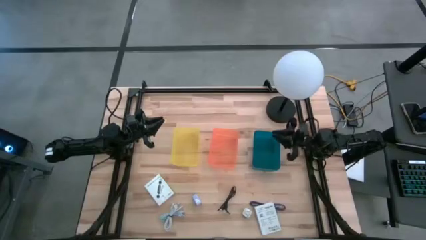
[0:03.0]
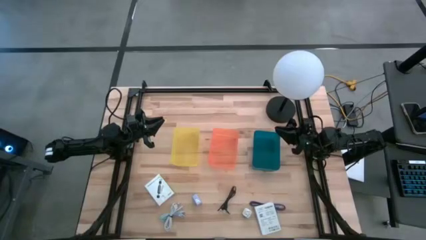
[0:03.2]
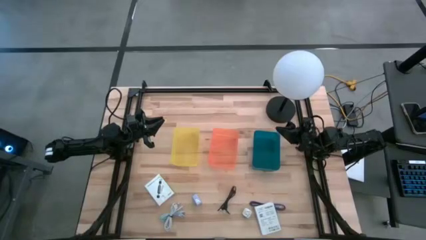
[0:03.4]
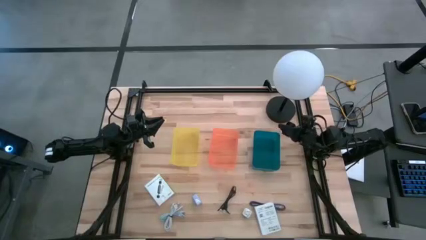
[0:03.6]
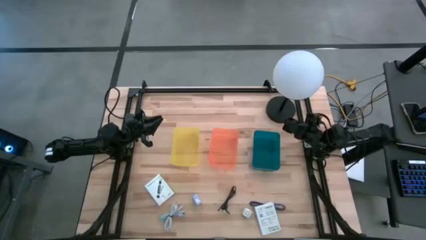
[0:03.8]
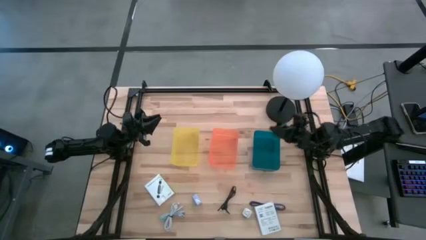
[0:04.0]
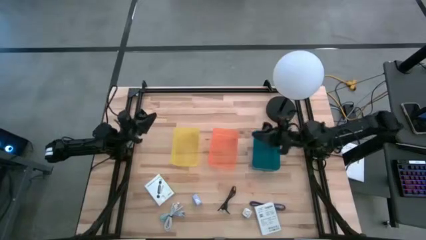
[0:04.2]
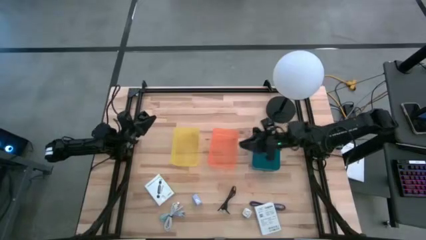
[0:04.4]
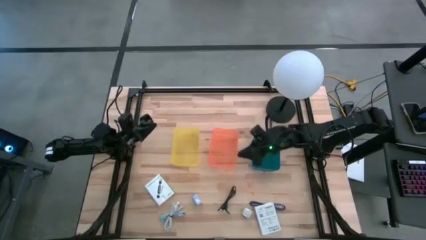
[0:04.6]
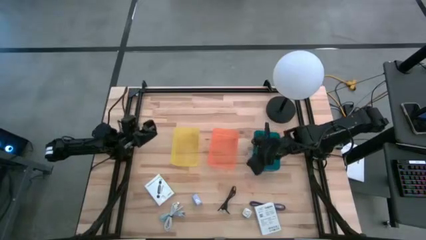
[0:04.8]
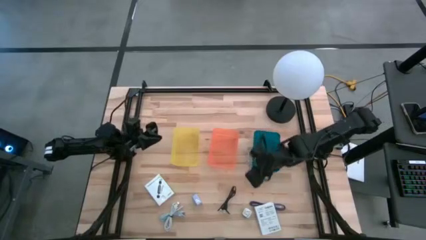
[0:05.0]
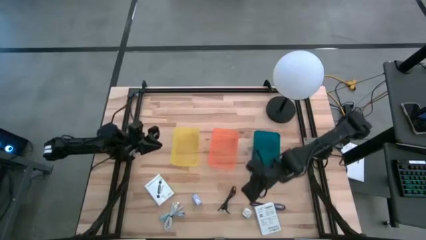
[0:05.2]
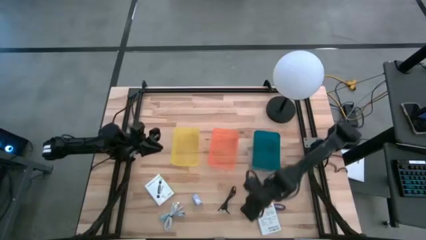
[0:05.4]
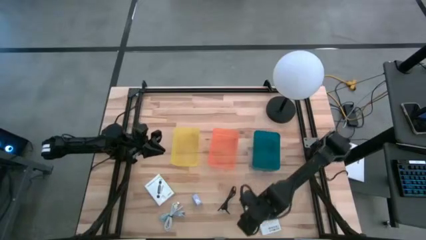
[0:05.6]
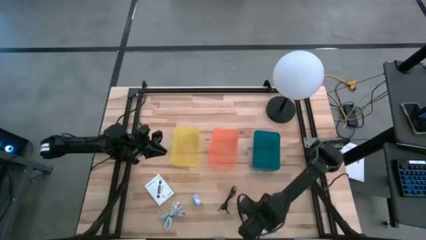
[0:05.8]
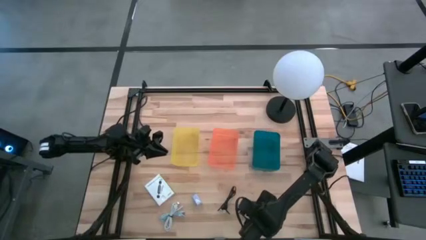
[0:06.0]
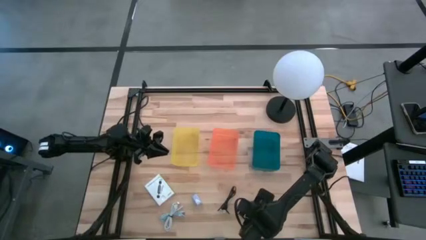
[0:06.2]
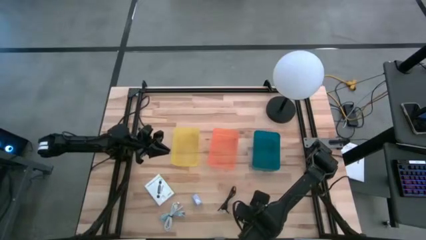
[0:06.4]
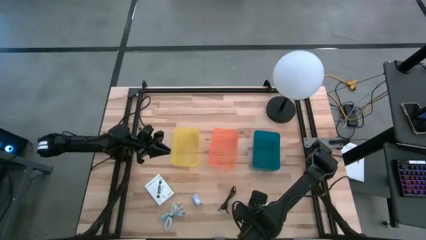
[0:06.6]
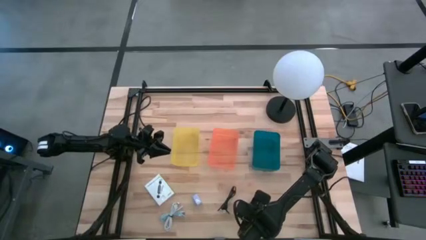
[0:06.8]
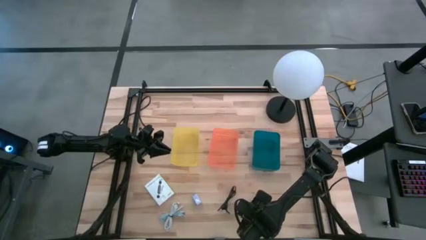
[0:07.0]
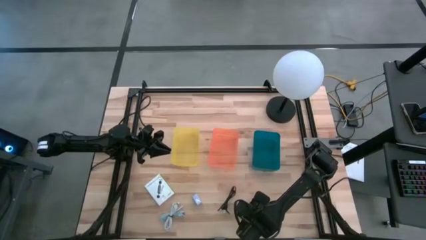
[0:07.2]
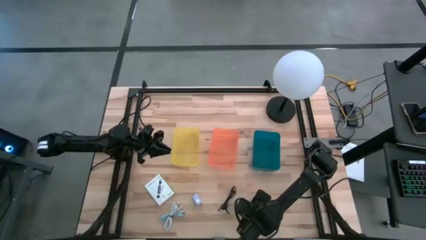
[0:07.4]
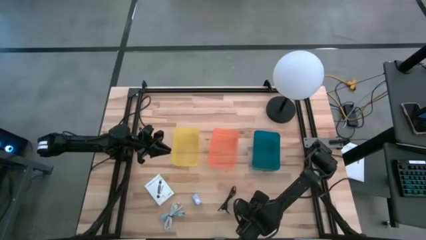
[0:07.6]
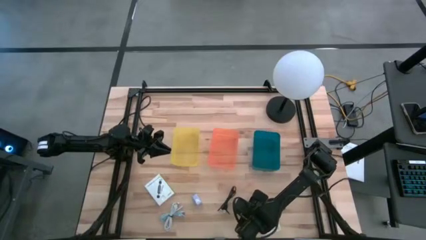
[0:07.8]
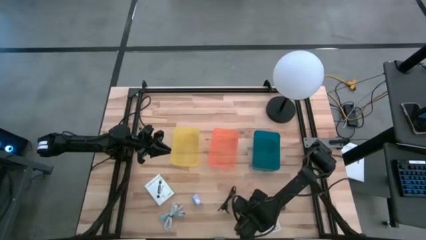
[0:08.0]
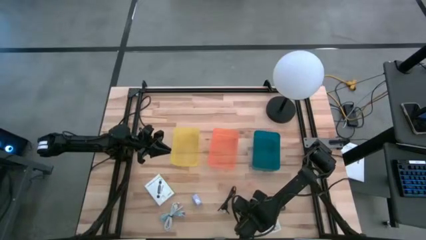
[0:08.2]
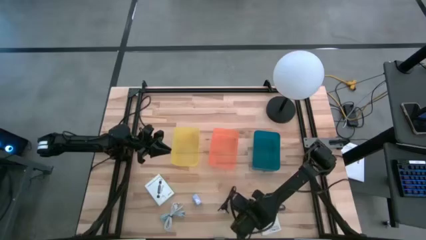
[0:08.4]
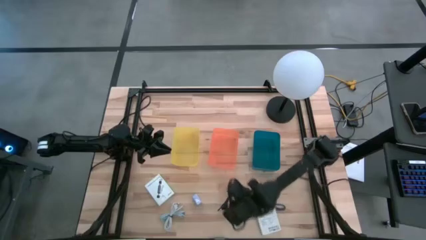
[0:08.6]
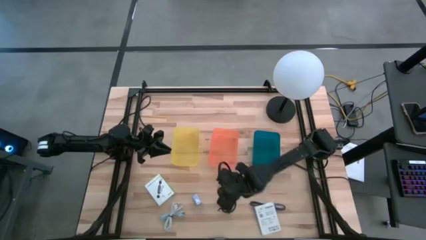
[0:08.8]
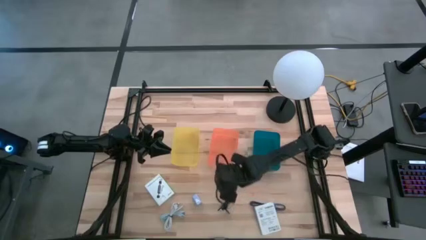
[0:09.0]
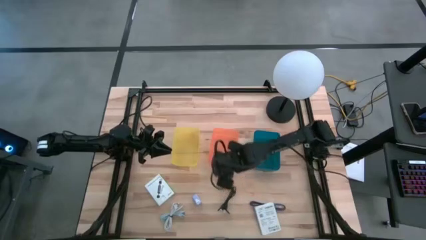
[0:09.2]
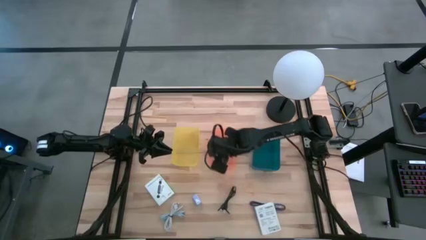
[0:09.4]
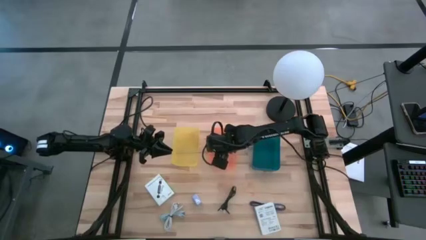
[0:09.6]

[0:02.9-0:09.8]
Task: Pick and place items into bin
Put the green charger adapter into the orange bin

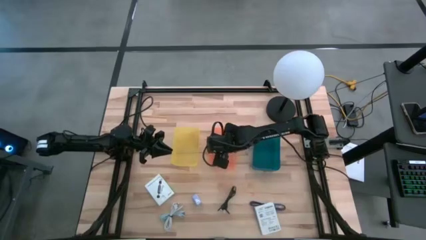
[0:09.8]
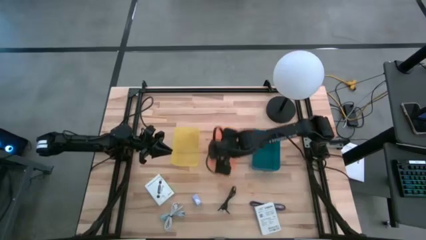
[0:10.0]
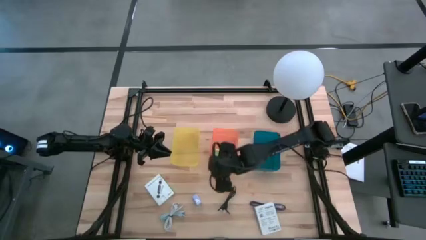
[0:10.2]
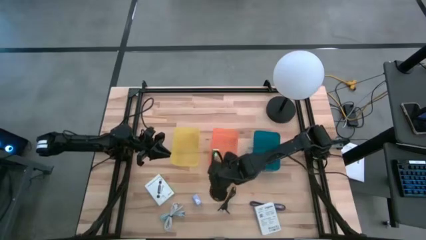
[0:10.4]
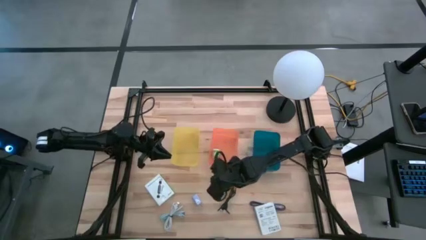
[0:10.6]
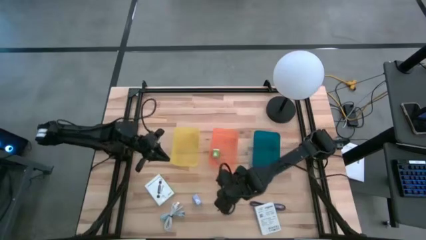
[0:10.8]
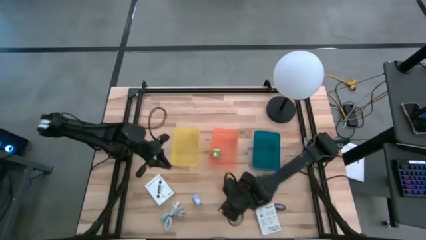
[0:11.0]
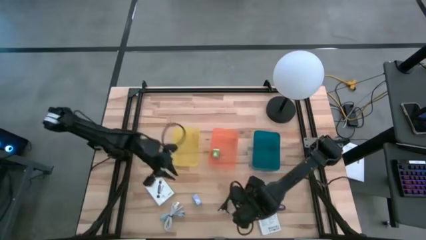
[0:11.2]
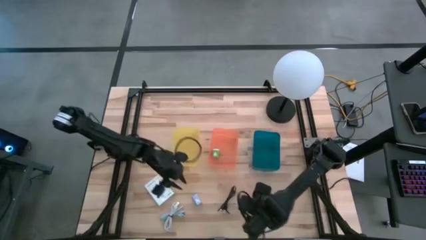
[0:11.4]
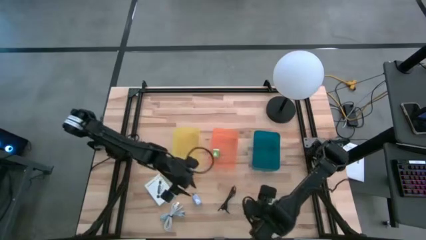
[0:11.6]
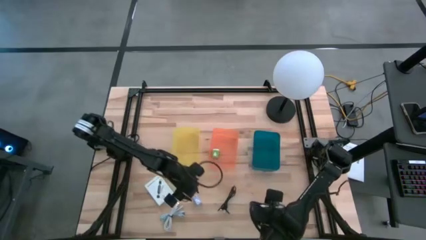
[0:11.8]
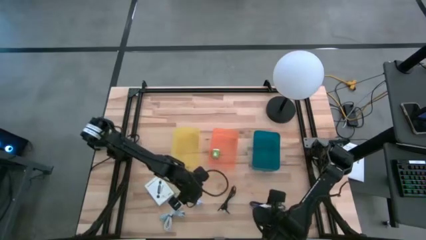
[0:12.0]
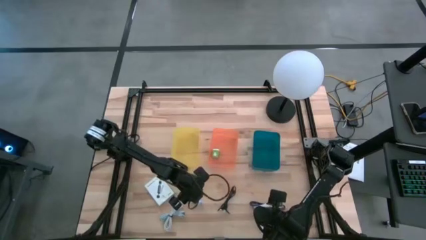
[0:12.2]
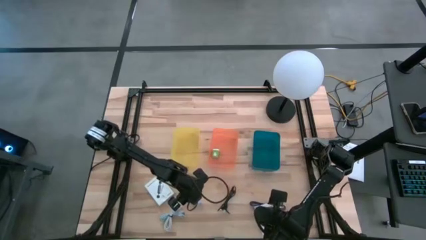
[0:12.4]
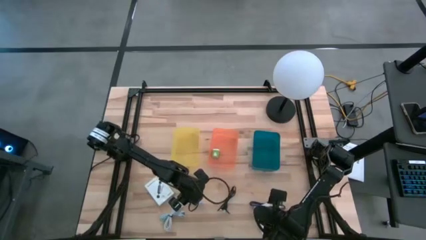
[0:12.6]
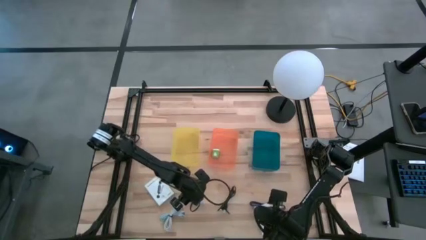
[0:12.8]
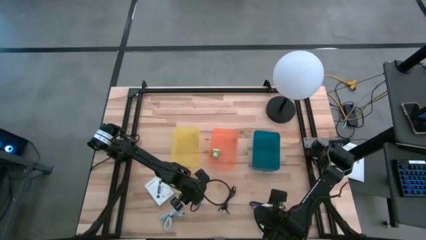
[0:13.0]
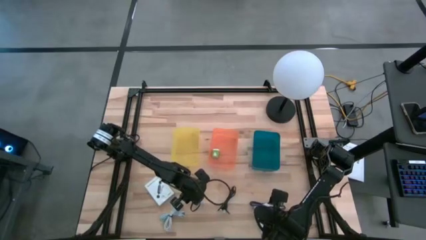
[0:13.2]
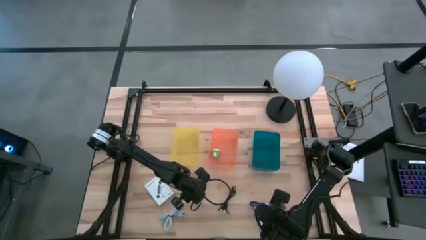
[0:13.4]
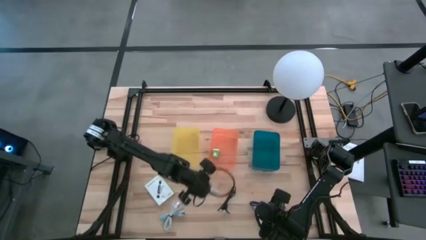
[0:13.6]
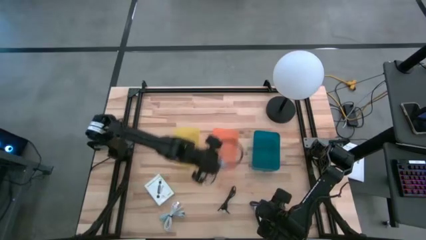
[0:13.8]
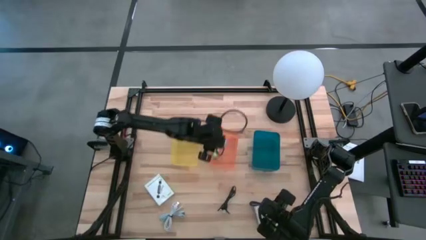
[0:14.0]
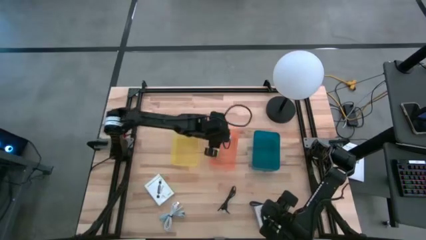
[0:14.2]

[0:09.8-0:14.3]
Put the purple charger adapter into the orange bin

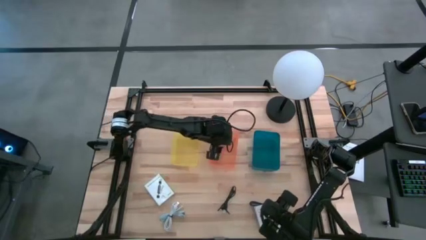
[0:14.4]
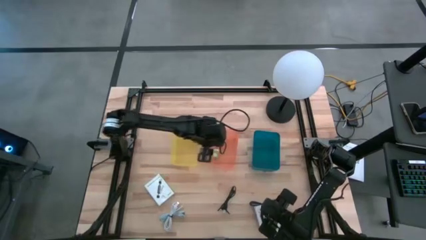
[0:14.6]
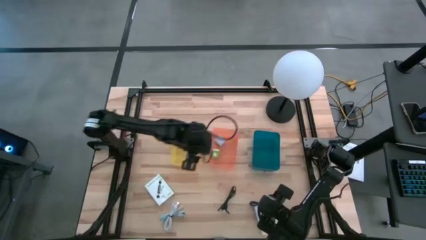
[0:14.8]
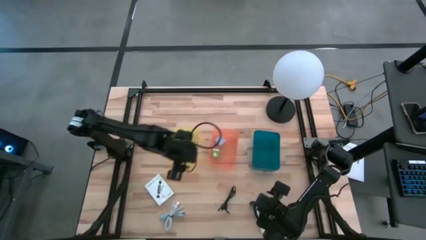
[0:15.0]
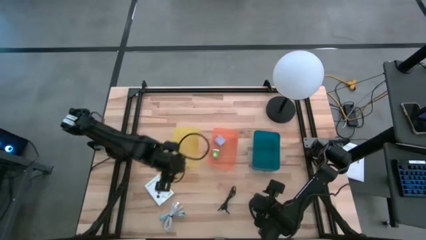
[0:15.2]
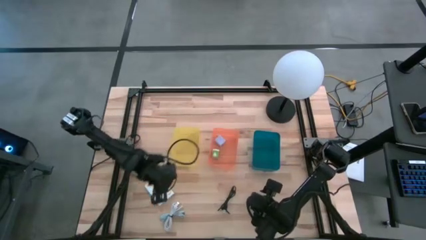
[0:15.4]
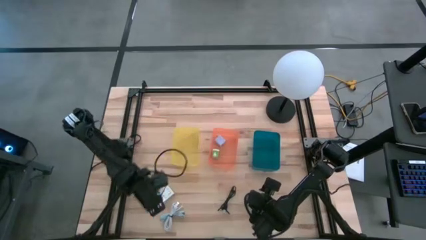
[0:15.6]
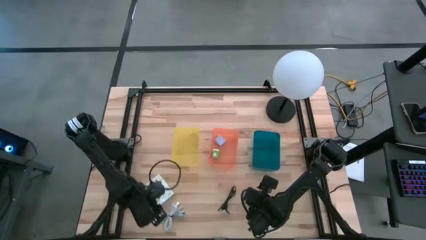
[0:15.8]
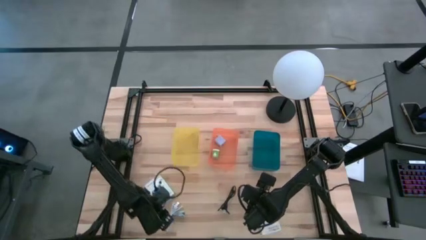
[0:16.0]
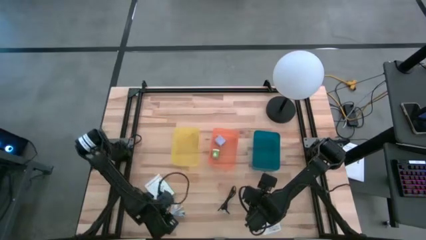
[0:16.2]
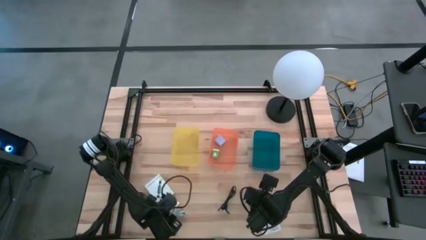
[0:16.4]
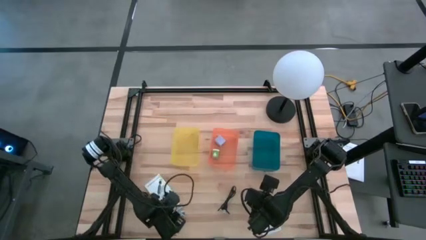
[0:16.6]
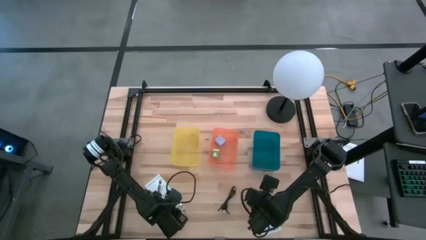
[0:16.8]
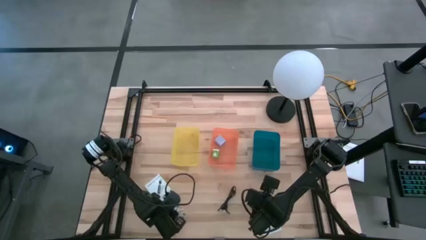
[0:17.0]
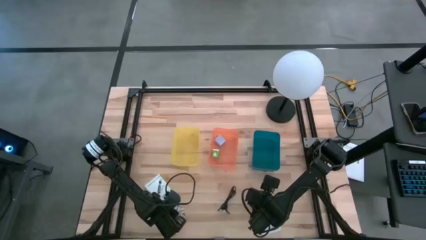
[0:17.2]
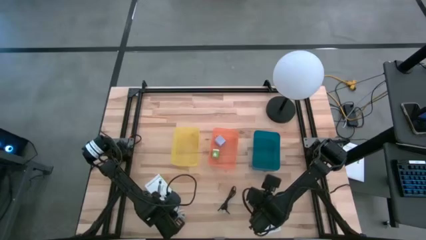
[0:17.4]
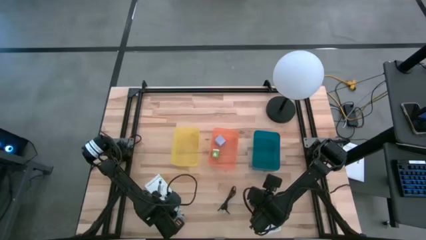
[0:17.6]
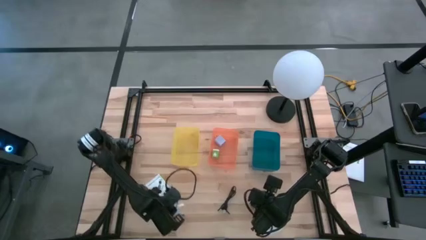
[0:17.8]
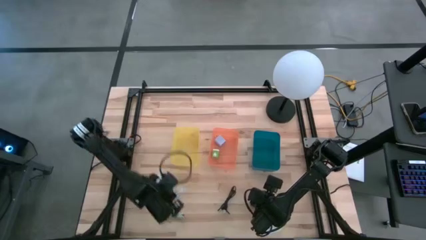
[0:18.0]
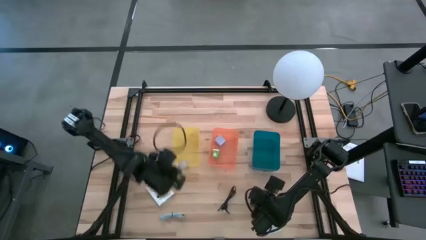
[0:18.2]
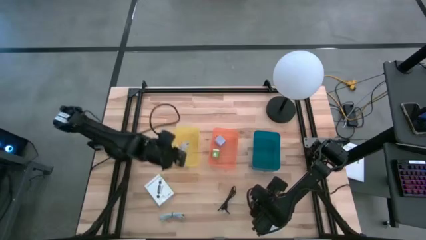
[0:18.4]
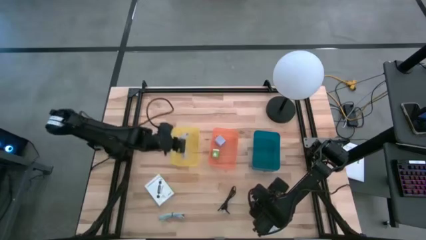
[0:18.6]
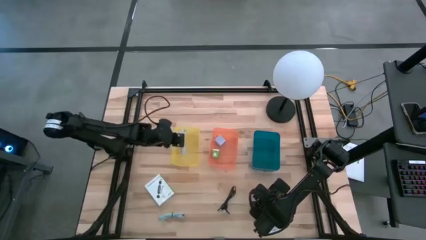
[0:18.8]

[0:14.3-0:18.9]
Put the white charger cable into the yellow bin

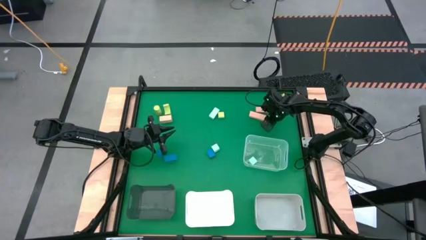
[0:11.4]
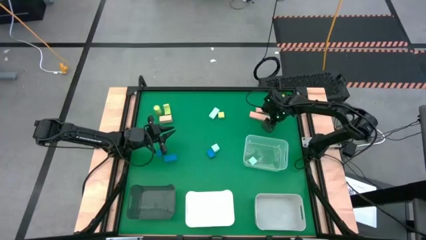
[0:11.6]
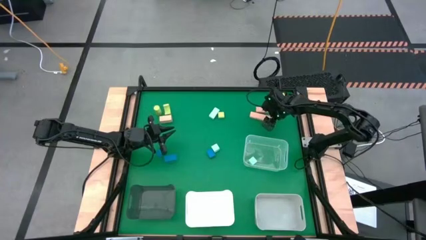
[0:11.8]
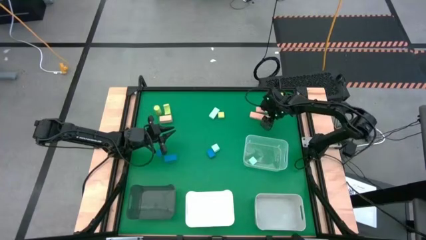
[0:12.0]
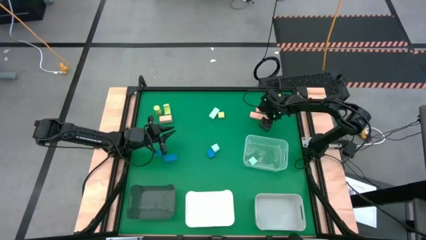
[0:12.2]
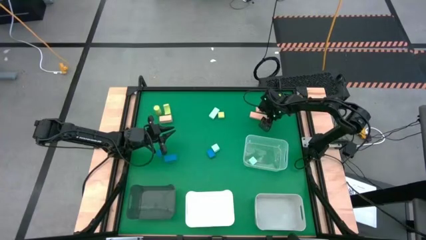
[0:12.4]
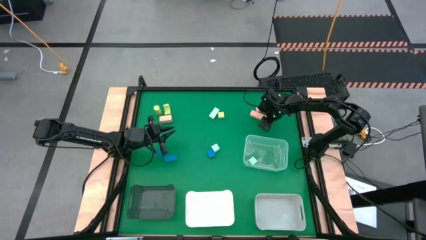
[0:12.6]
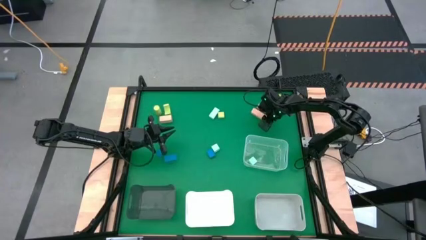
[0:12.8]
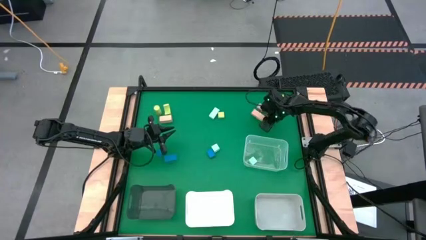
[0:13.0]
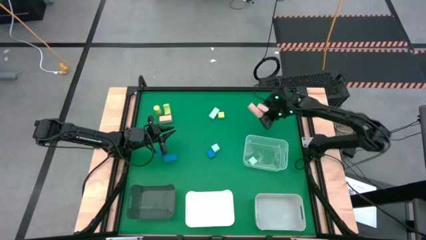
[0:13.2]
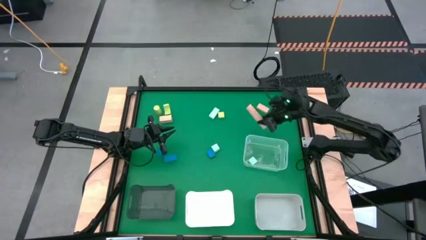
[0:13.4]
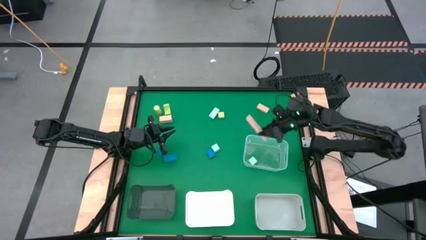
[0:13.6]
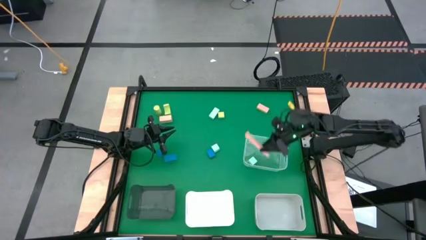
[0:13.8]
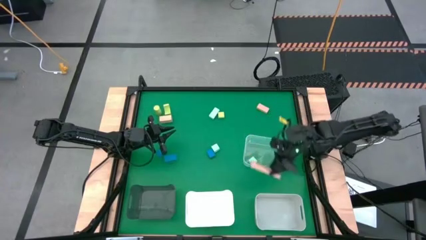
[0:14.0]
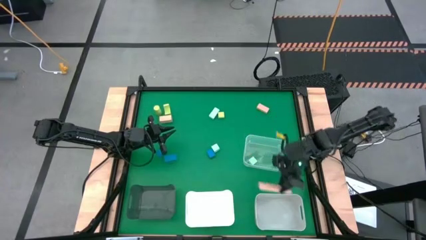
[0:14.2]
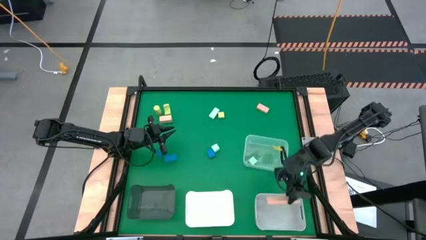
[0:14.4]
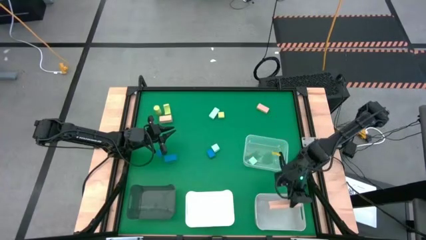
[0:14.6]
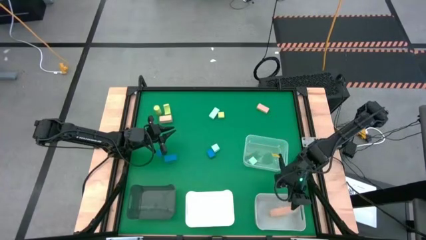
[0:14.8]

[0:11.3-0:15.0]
Task: Sort & place blocks by color
Put the bottom right brown block into the gray bin
